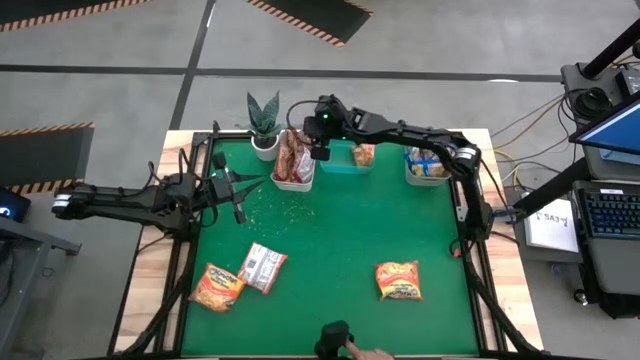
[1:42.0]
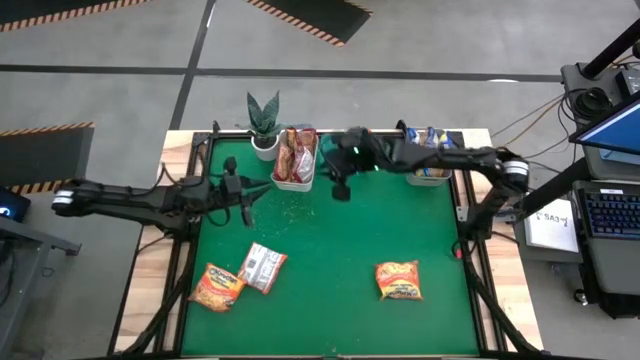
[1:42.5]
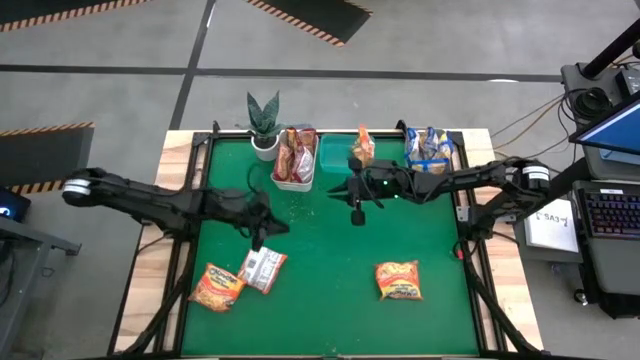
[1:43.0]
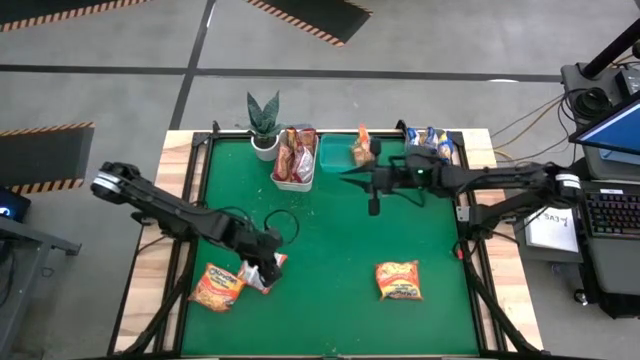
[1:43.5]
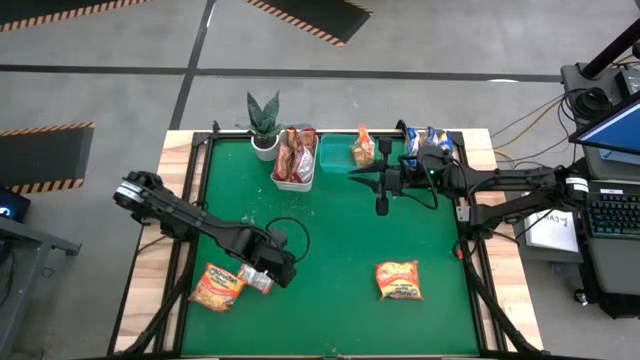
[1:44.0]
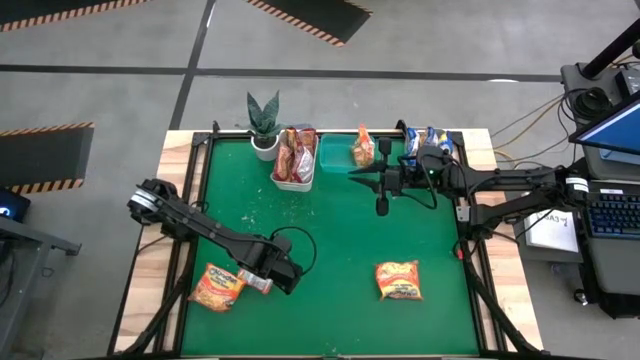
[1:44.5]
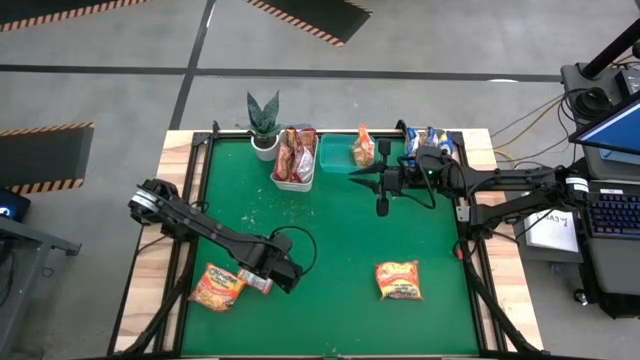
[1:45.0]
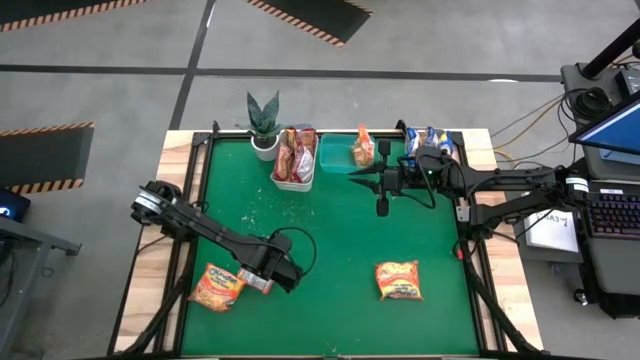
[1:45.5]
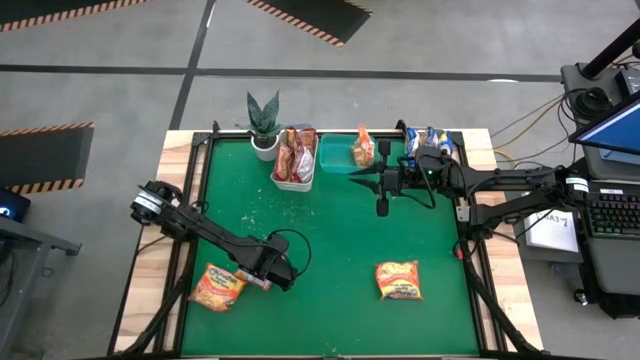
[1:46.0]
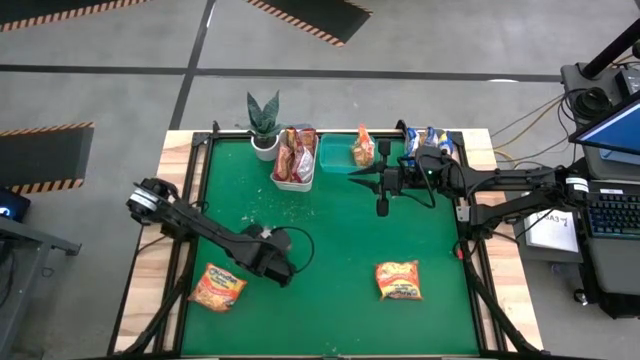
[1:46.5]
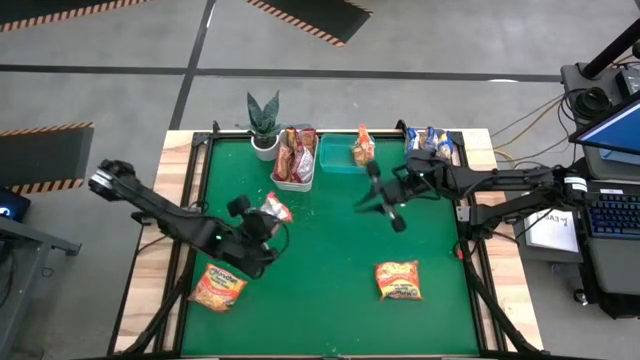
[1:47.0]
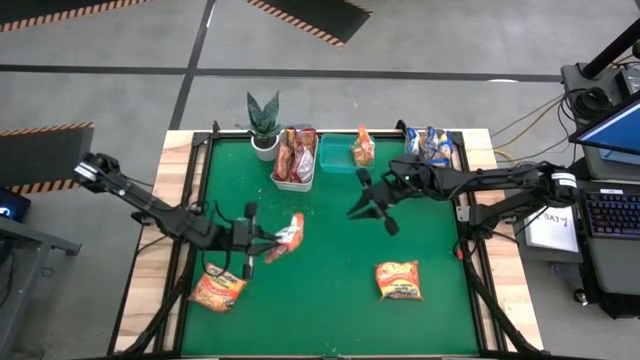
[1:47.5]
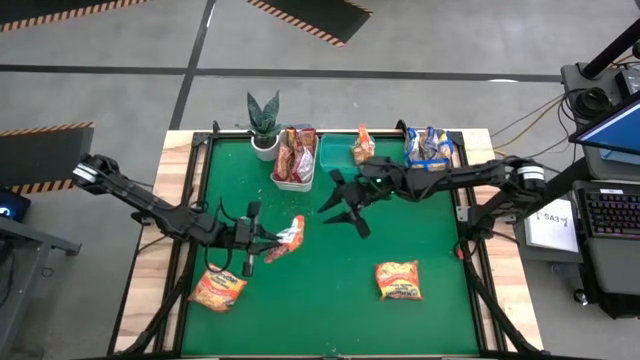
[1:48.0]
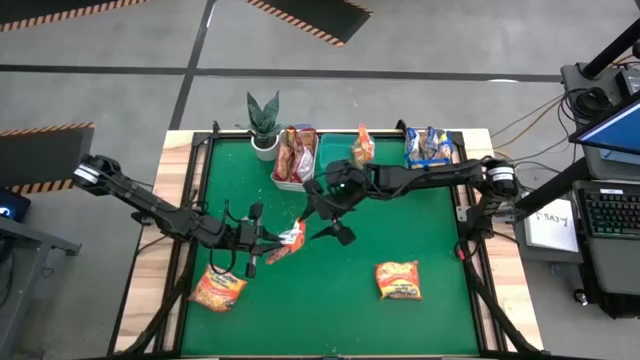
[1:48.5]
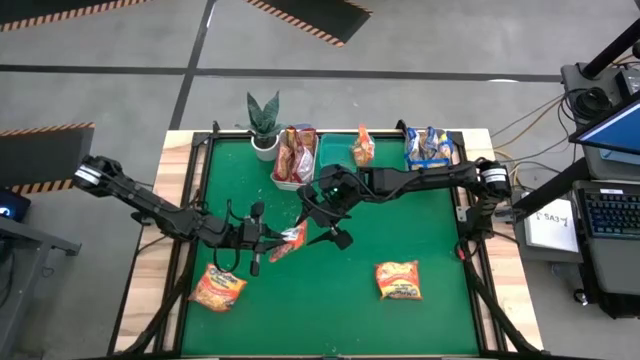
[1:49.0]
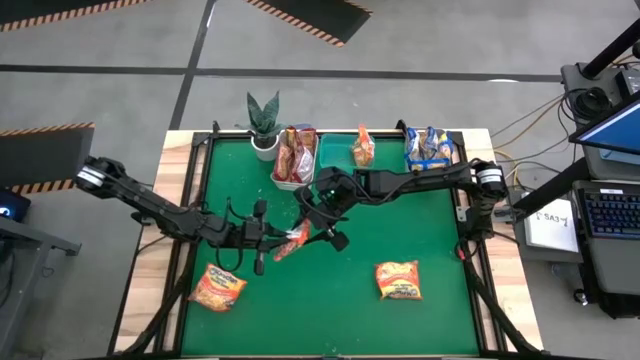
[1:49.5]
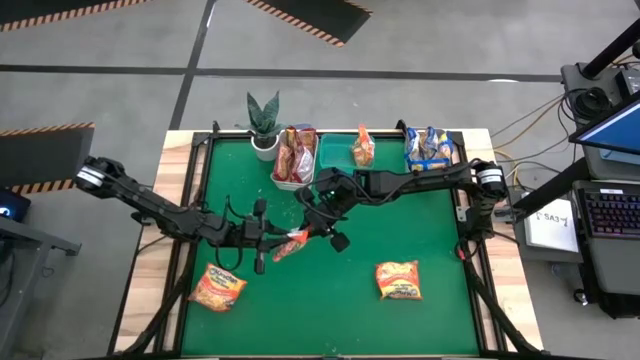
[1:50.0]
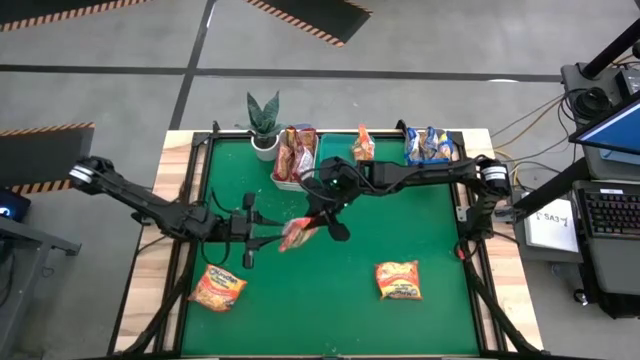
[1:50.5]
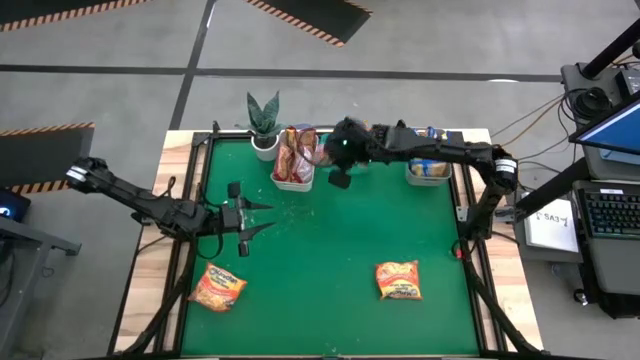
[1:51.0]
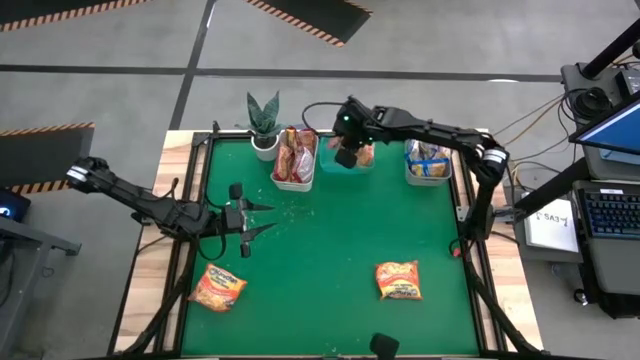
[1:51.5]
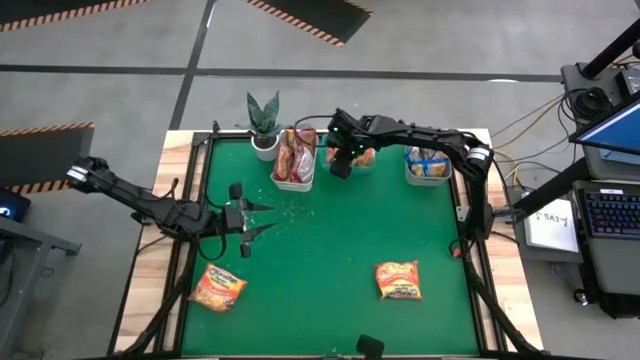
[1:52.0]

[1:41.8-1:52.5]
Task: Sort Maruchan noodles
Put the orange noodle pack into the green bin

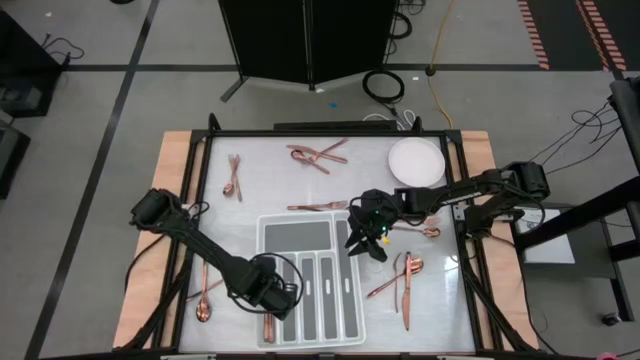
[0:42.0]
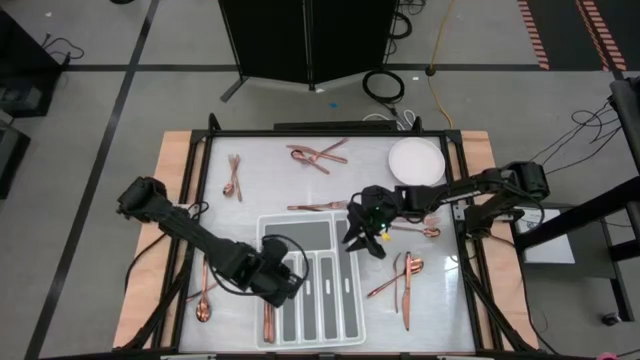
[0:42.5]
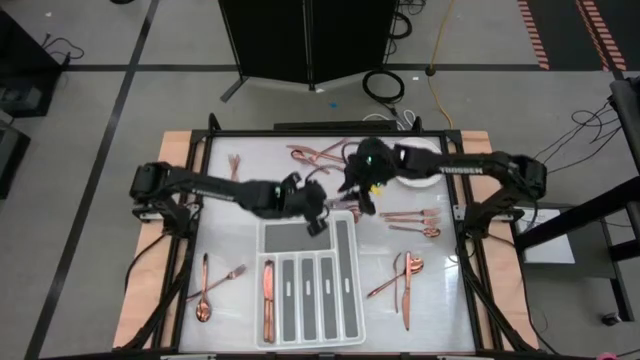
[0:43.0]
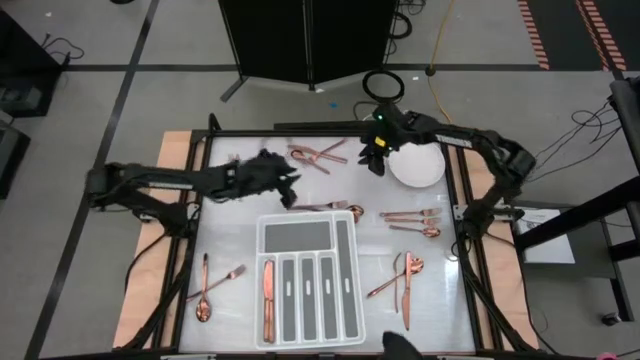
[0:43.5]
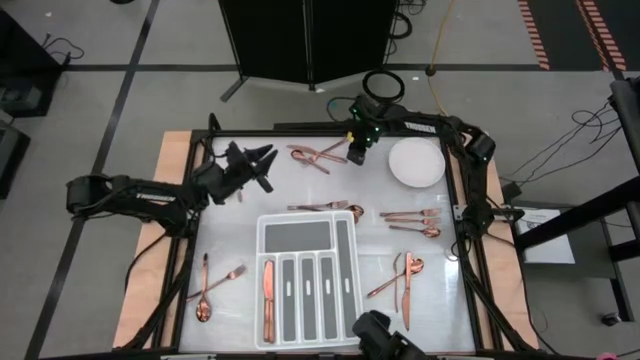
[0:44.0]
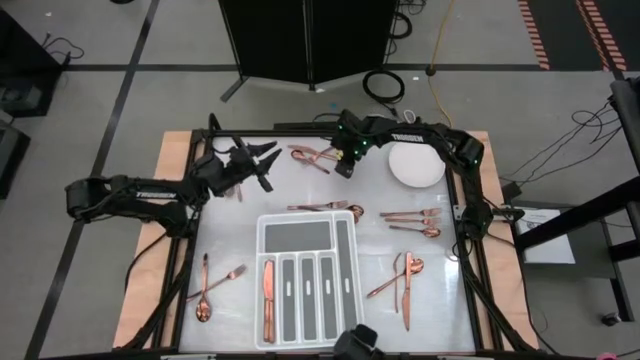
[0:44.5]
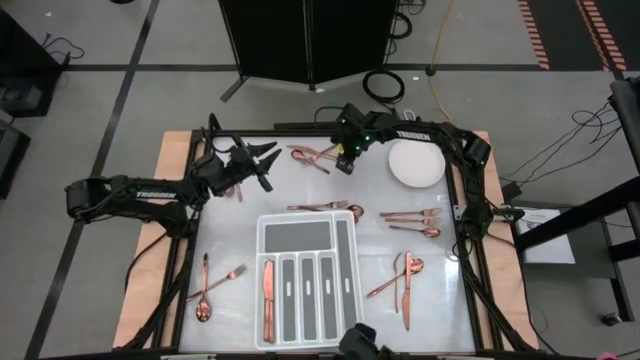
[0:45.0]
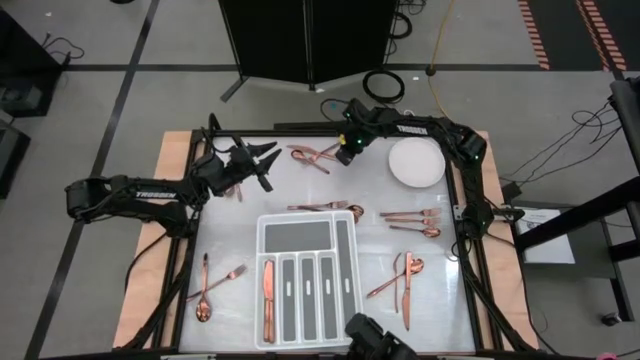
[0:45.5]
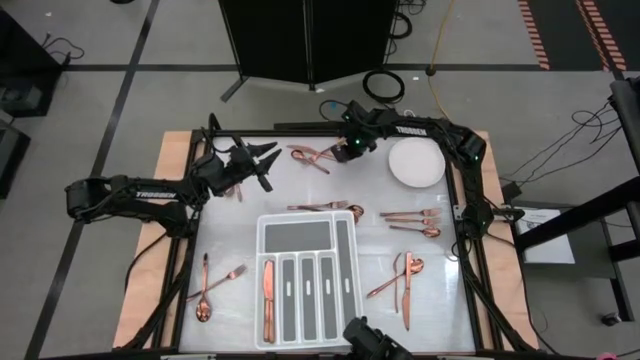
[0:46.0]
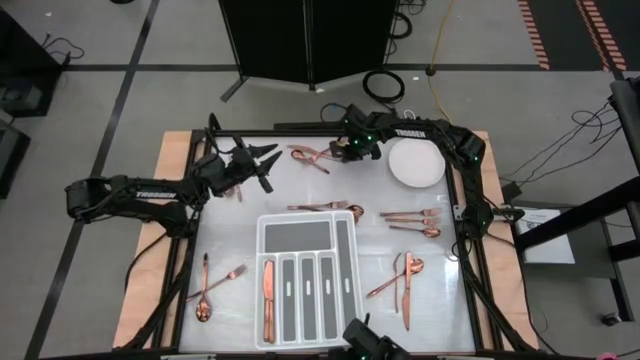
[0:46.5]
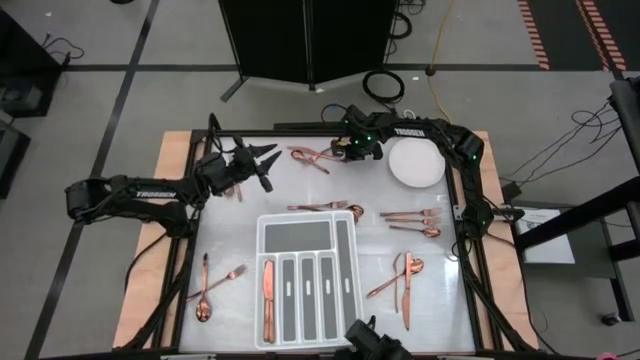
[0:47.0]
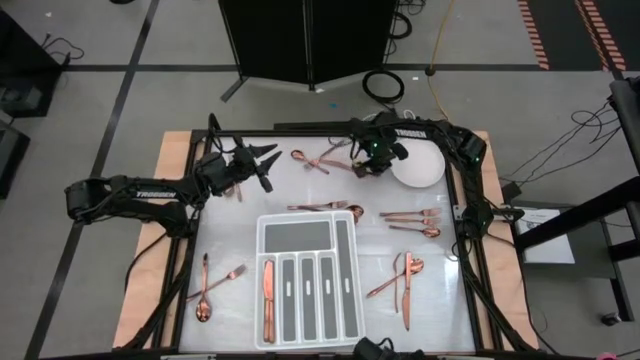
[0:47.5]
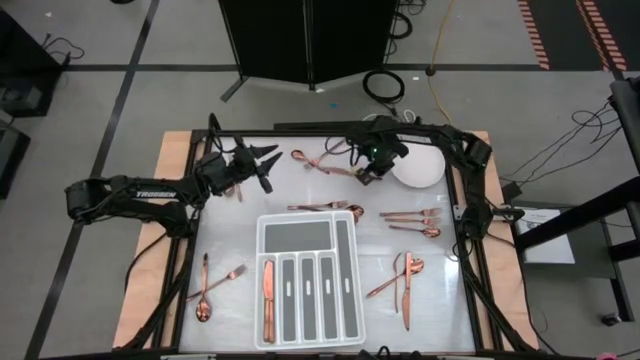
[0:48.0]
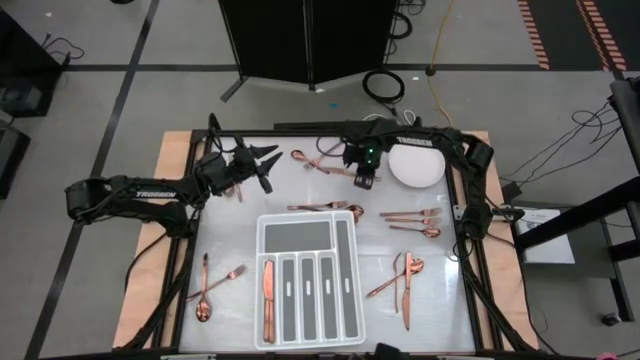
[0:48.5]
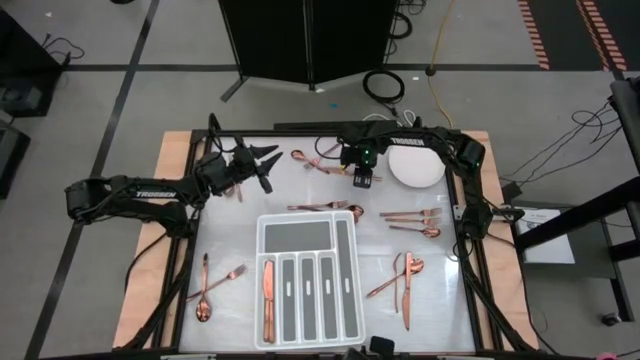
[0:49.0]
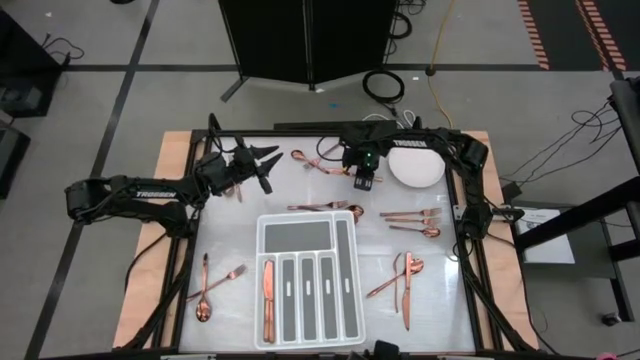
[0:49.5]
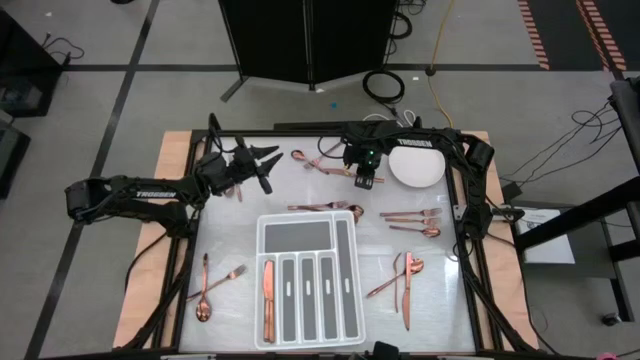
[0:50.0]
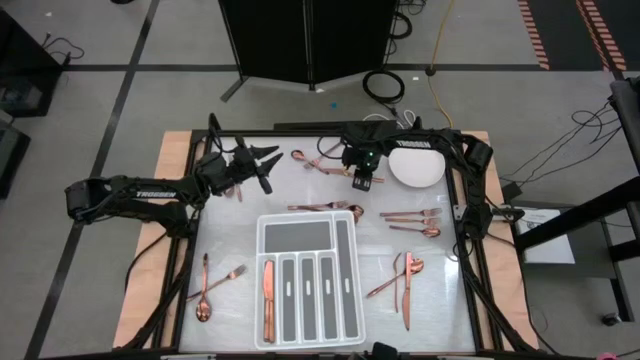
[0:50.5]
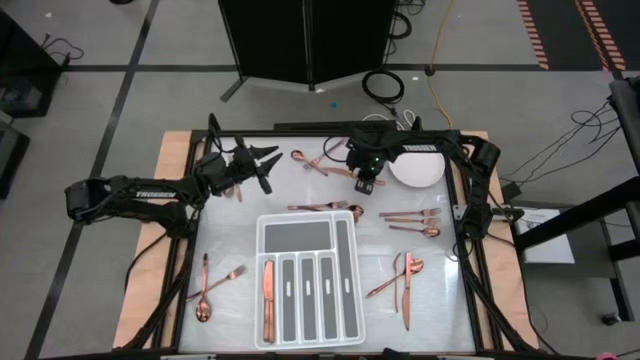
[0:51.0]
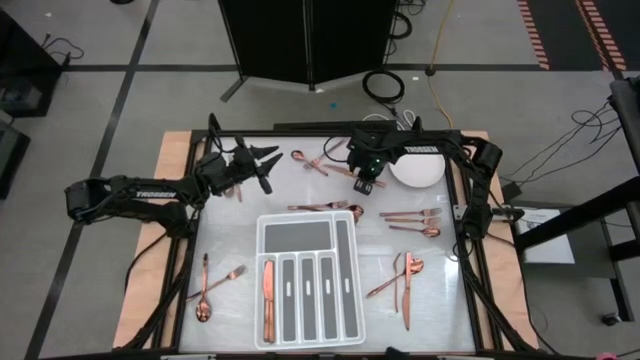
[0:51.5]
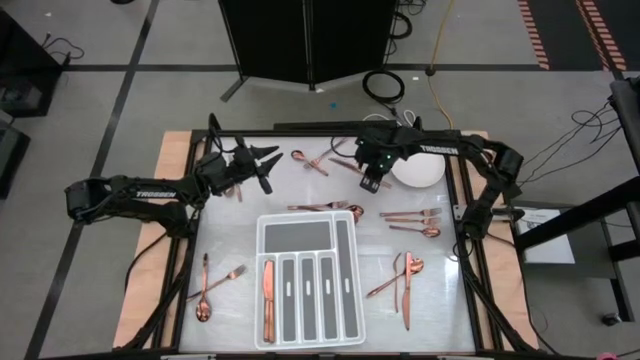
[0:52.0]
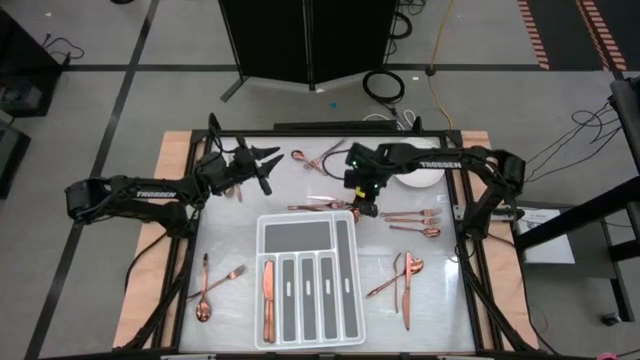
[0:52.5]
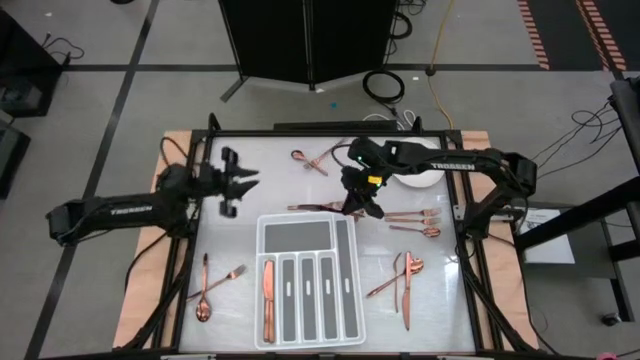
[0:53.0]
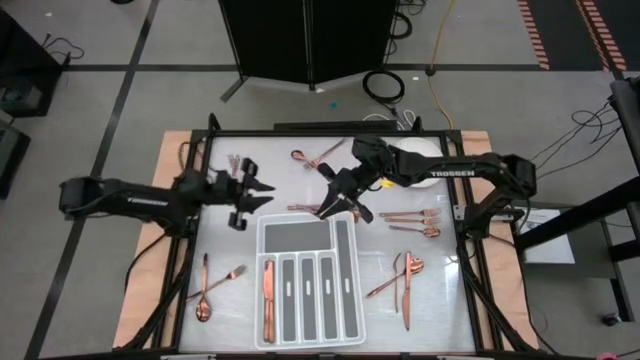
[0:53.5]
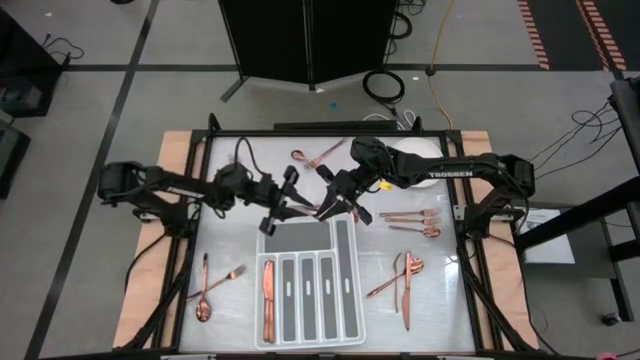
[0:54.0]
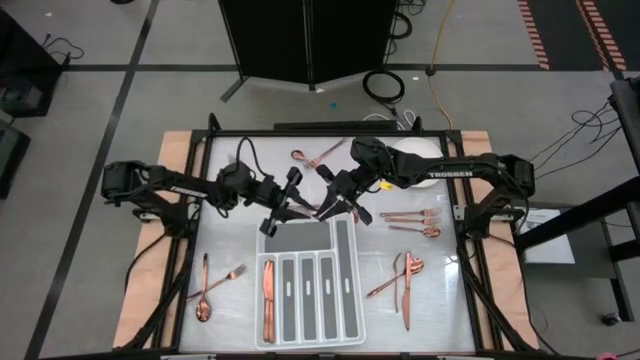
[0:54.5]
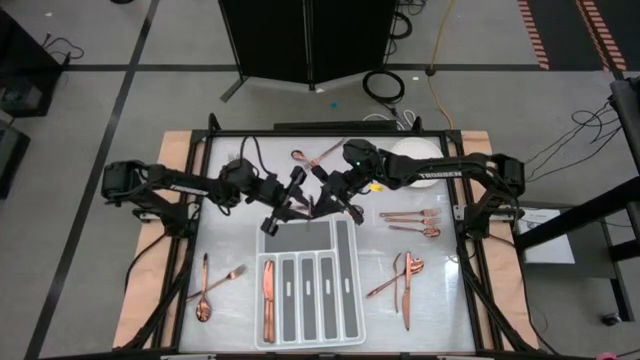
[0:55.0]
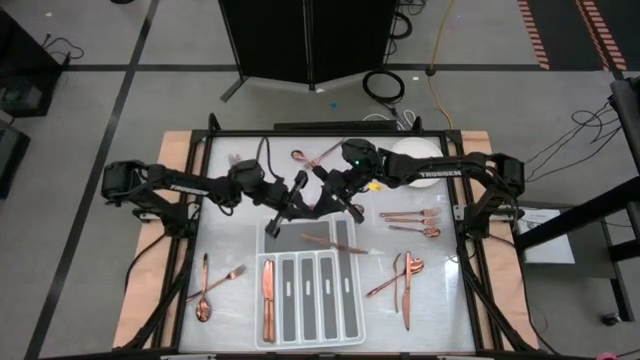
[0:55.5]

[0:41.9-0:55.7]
Task: Sort silverware
Put the top knife into the silverware tray
